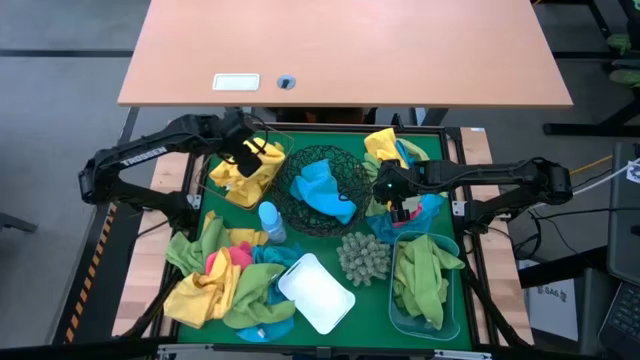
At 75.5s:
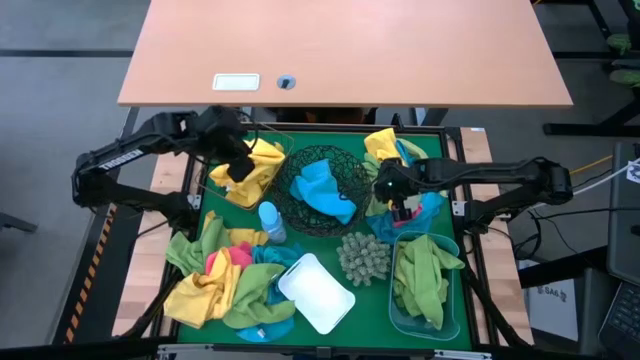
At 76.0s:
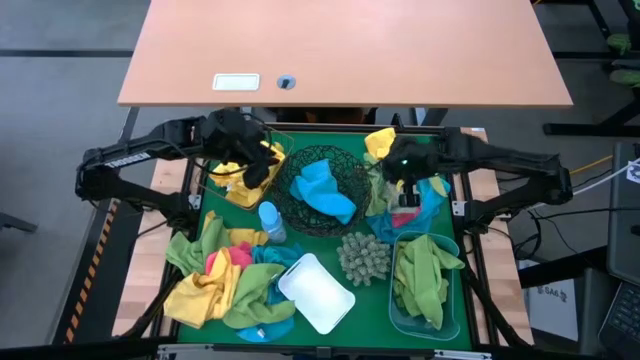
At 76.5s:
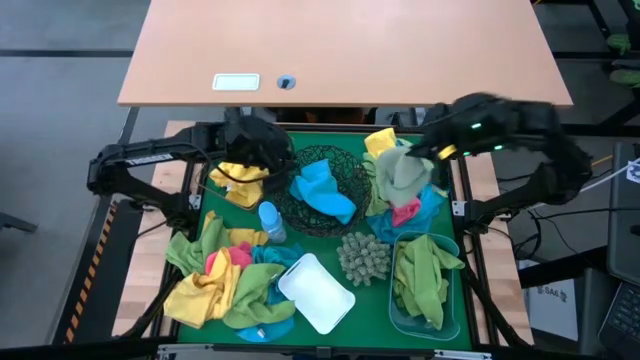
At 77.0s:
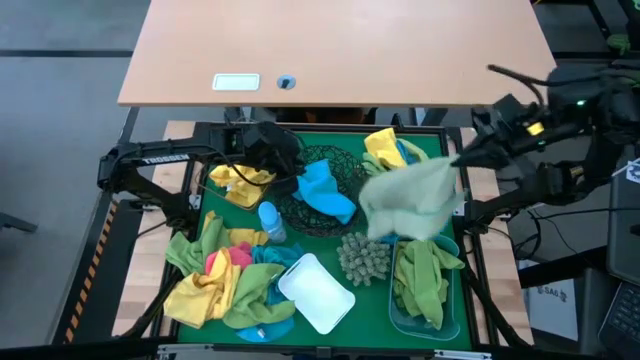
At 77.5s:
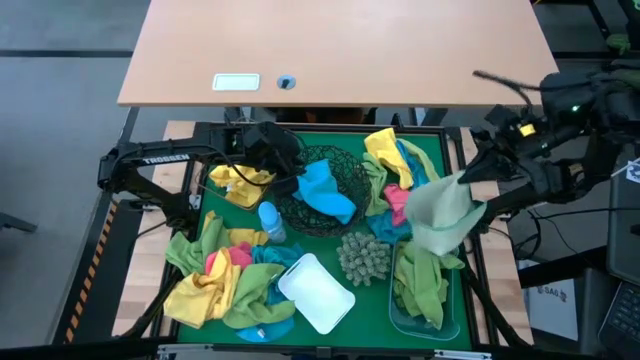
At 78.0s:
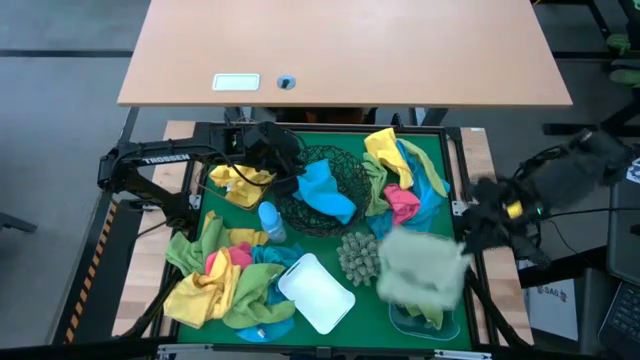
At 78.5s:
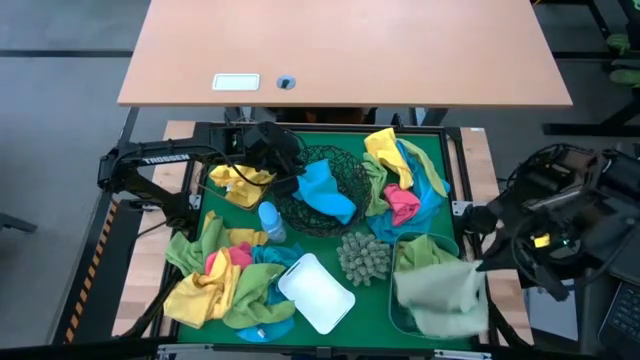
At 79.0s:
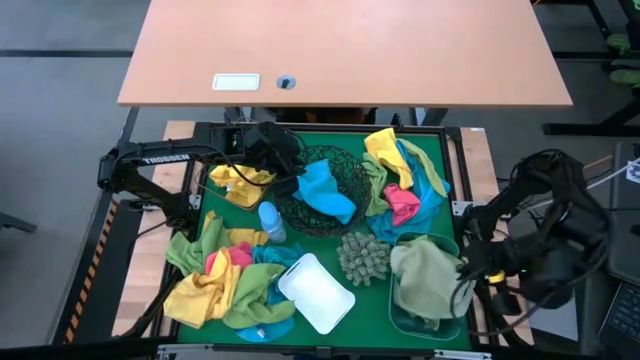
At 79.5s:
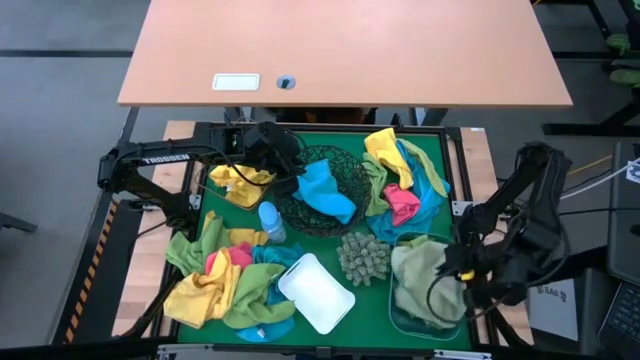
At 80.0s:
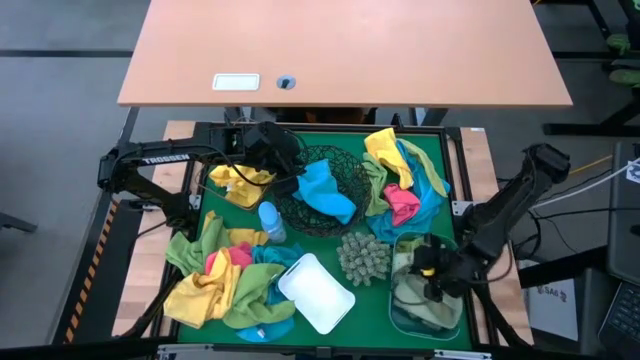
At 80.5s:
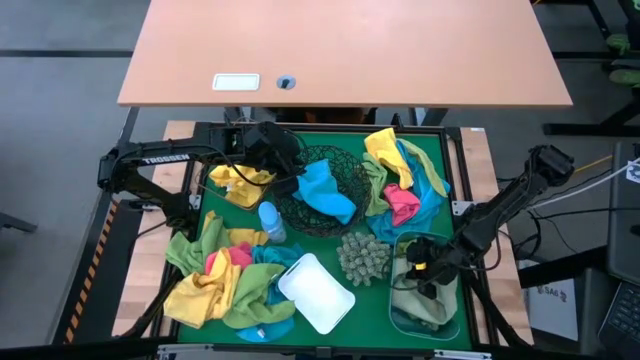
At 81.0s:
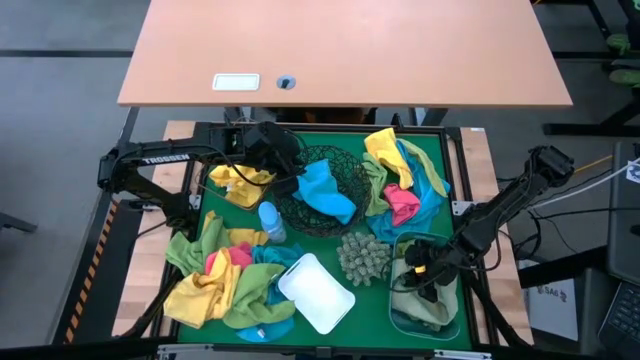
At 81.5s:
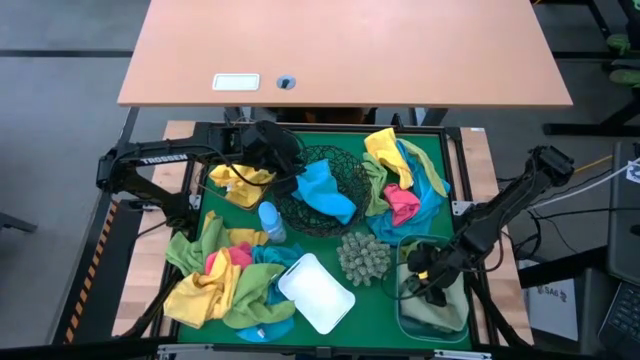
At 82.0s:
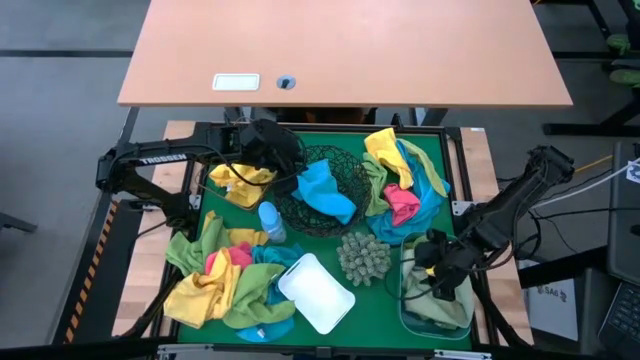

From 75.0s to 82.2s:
Task: Sort microfiber towel by color & place in baskets
Put the green microfiber cloth into the blue bin

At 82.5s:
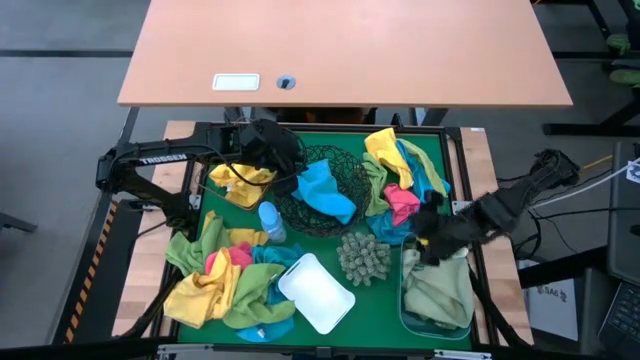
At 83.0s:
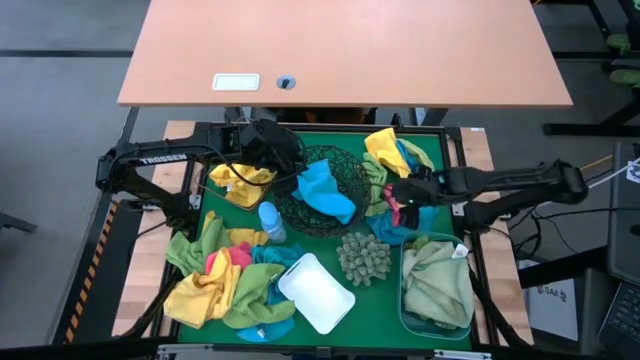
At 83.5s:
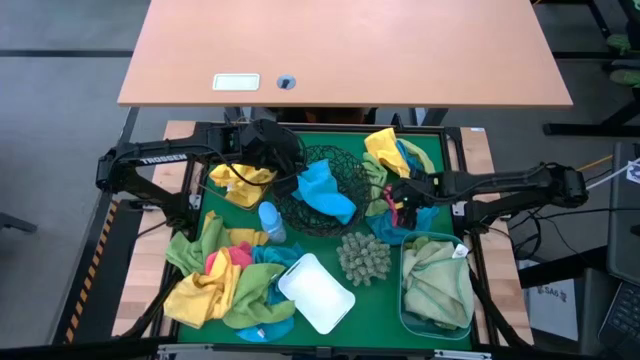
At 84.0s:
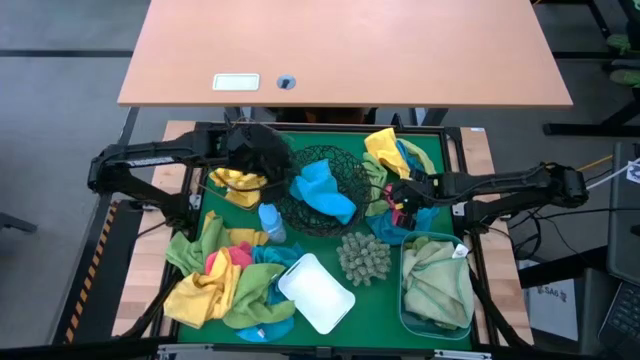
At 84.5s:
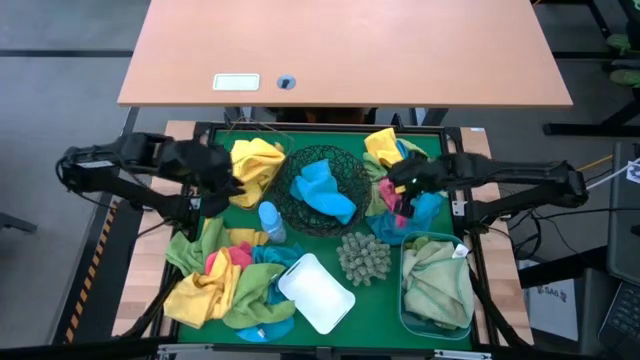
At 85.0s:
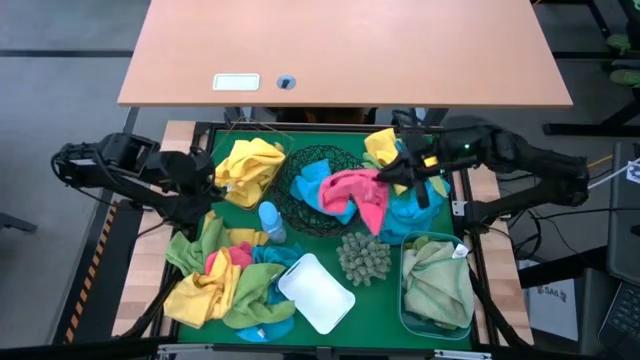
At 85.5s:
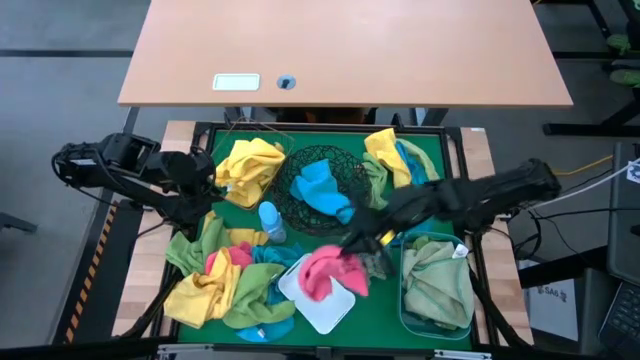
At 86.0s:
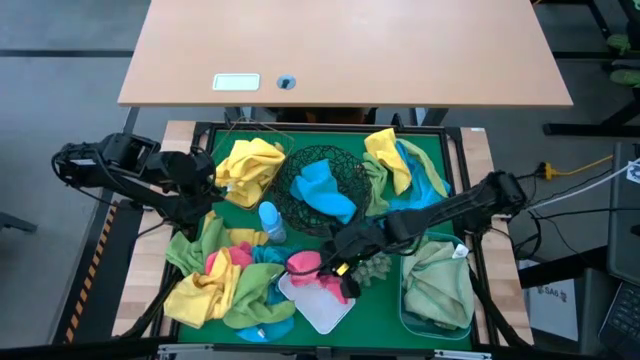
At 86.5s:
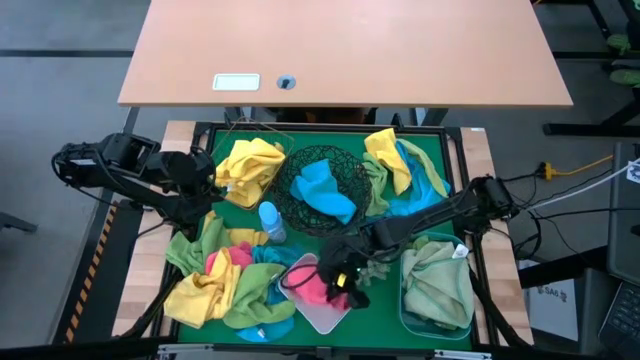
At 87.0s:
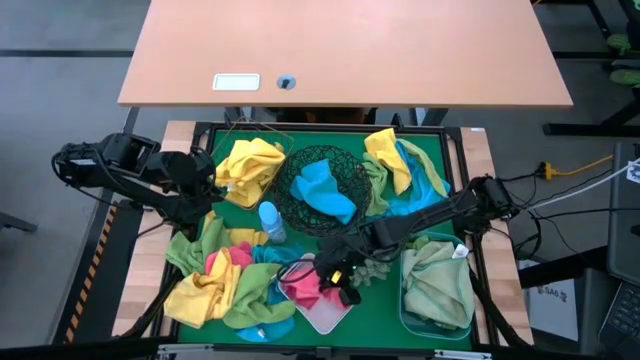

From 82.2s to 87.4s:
Put the pink microfiber cloth into the white bin

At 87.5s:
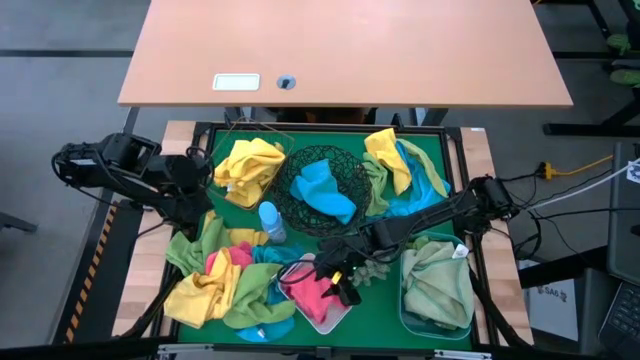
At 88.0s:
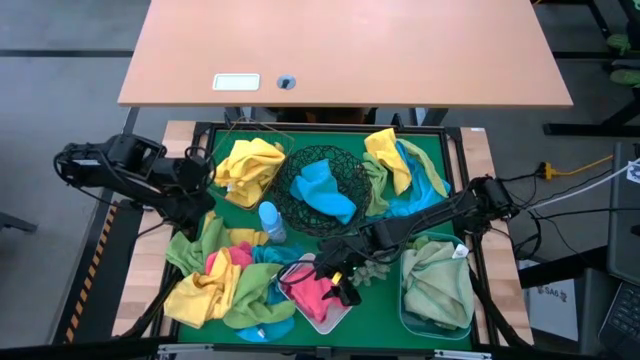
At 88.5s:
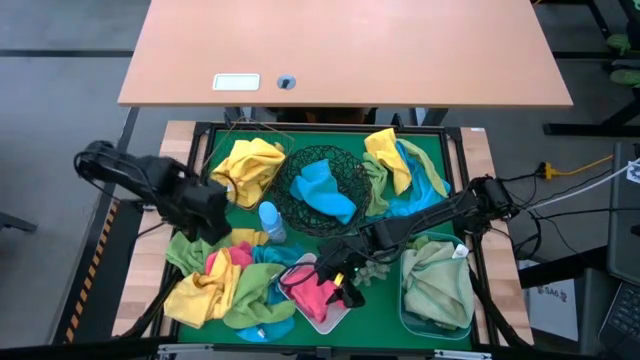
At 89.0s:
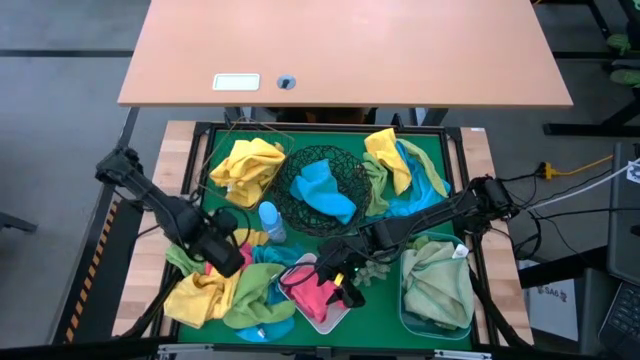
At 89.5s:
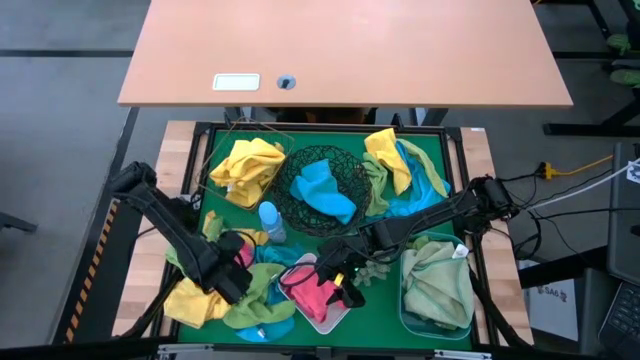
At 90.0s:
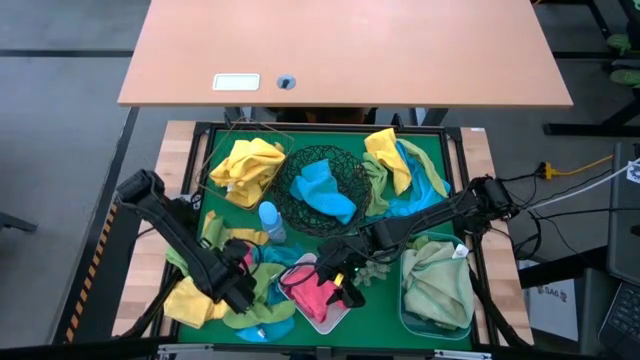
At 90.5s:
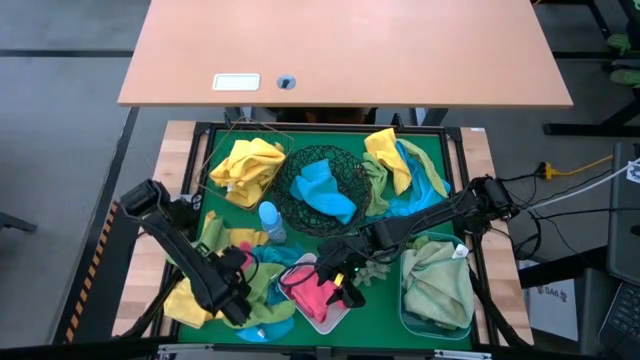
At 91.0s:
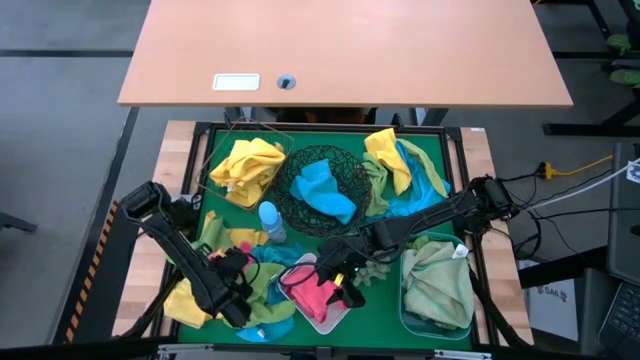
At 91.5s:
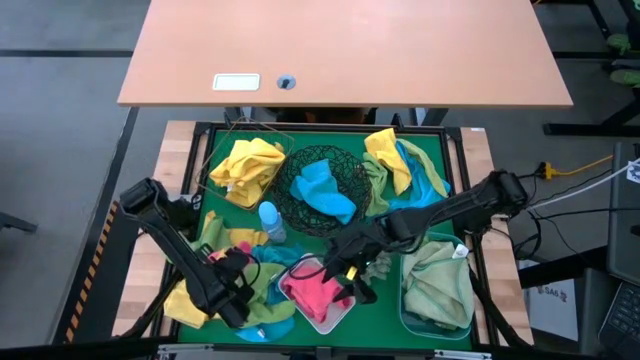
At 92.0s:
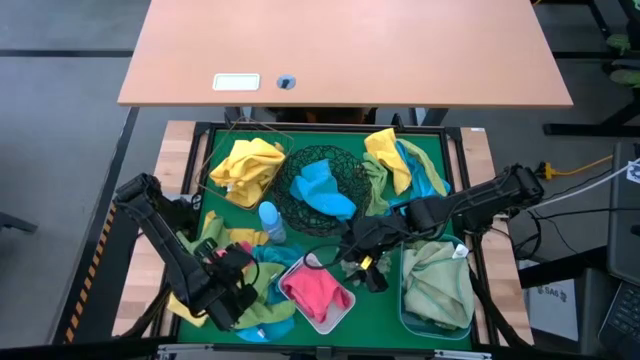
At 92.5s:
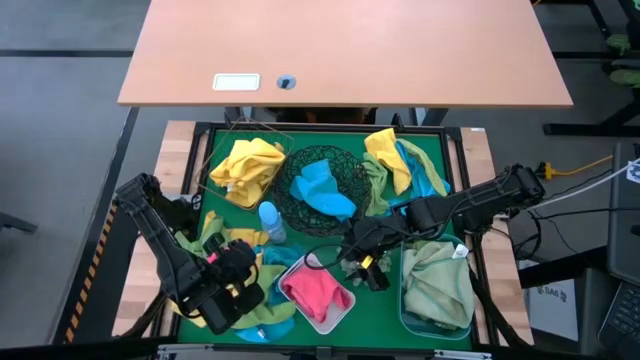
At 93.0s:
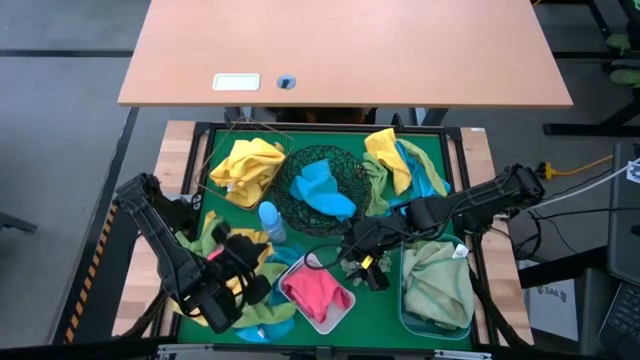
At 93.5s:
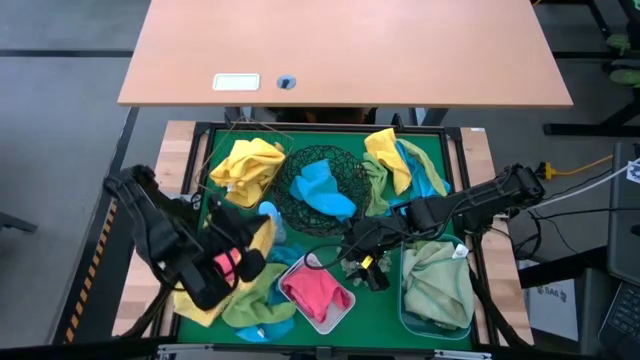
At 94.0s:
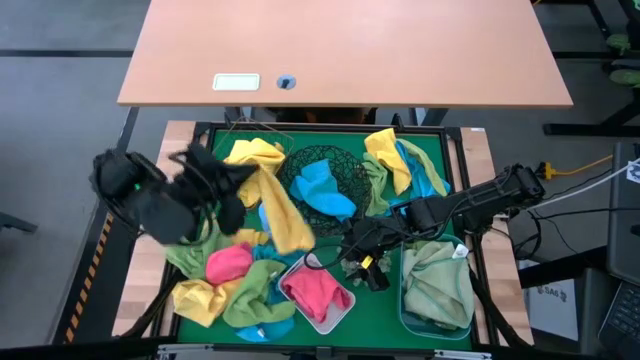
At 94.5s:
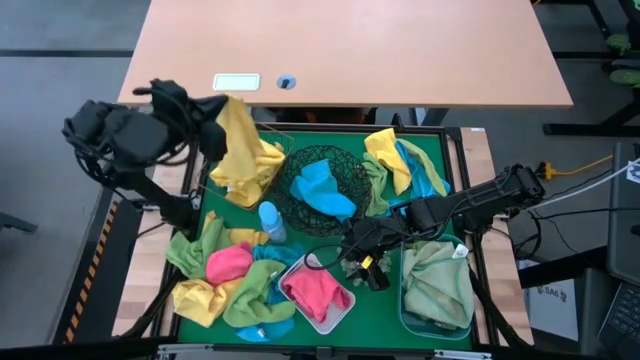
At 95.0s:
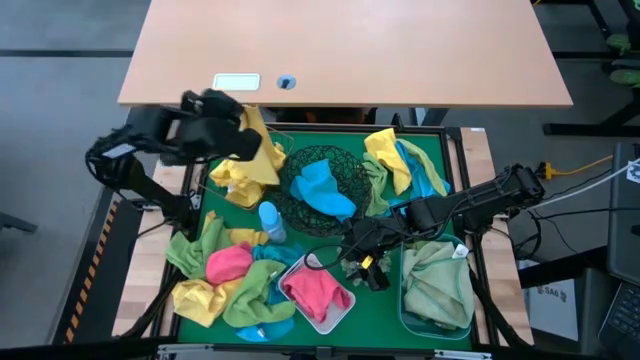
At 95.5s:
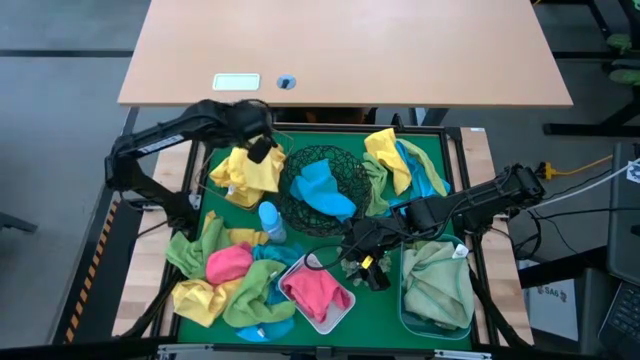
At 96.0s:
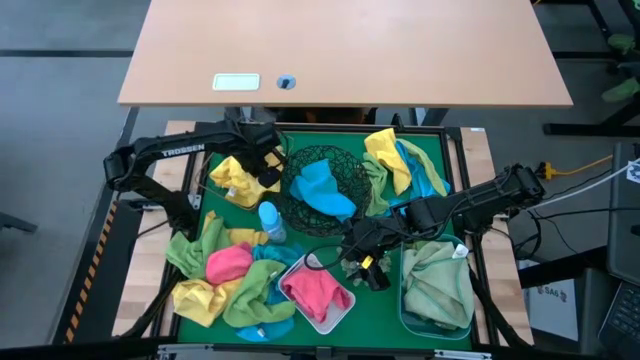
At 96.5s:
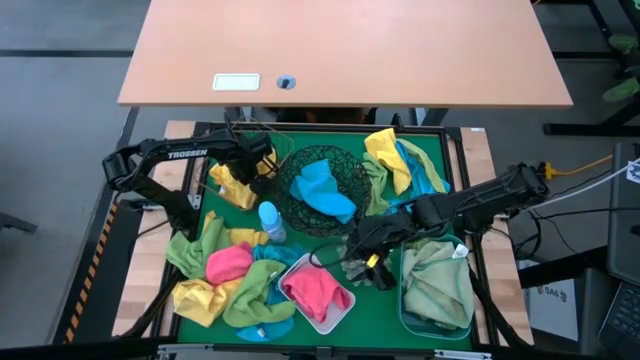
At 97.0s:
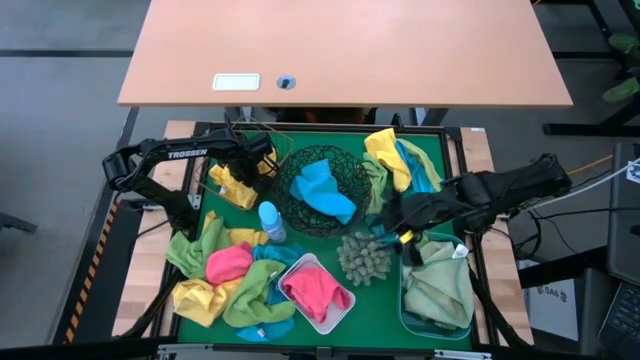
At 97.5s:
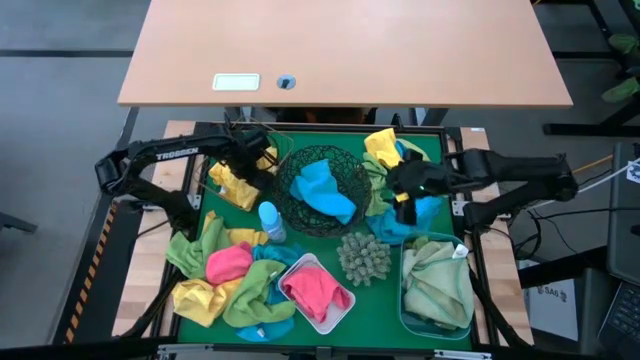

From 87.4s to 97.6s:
Put the yellow microfiber cloth into the rectangular wire basket
